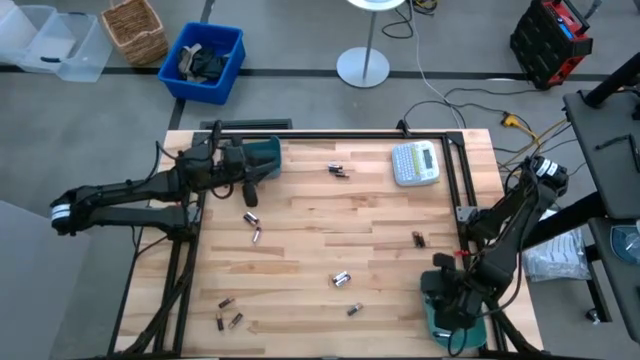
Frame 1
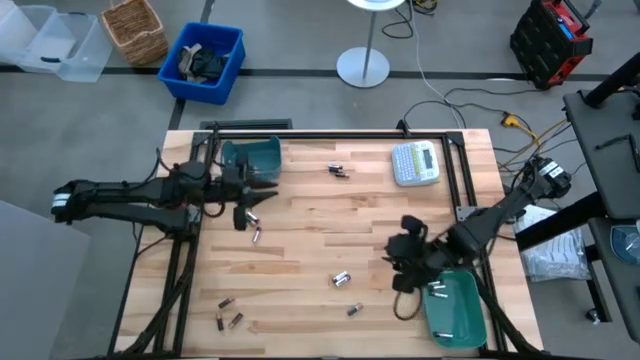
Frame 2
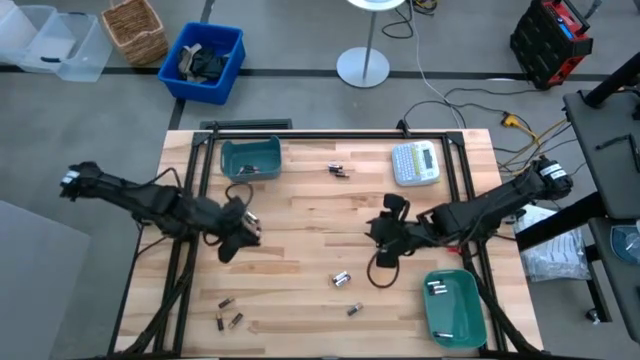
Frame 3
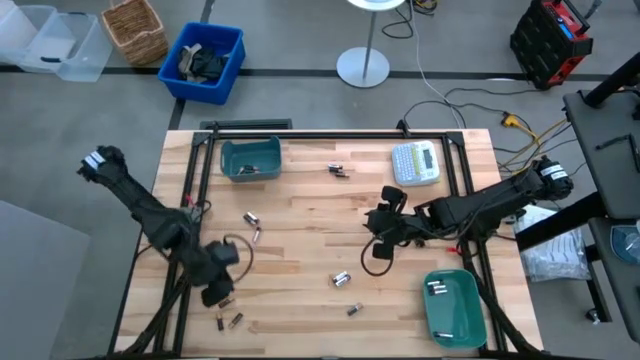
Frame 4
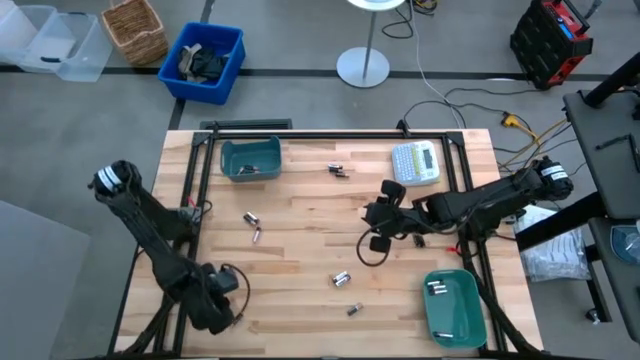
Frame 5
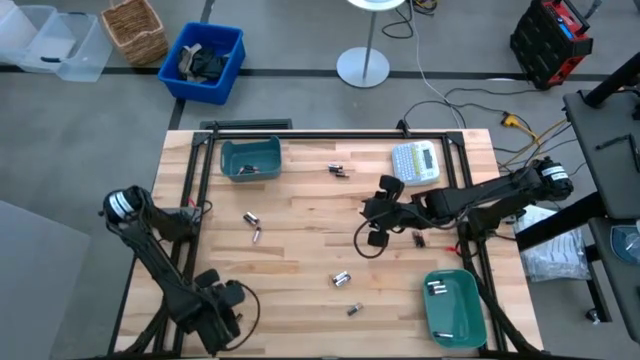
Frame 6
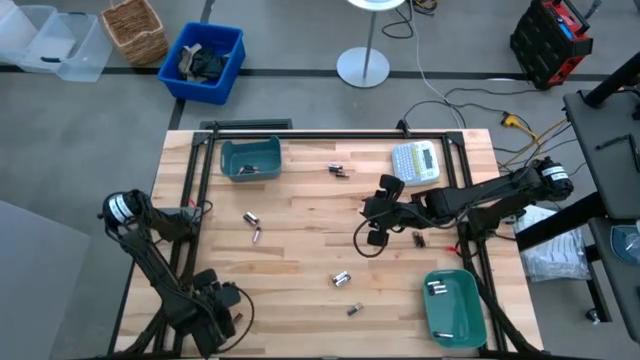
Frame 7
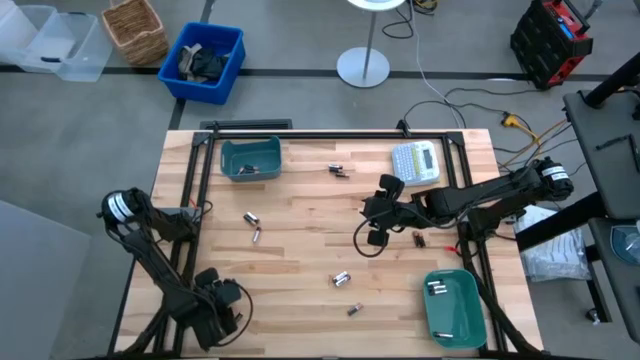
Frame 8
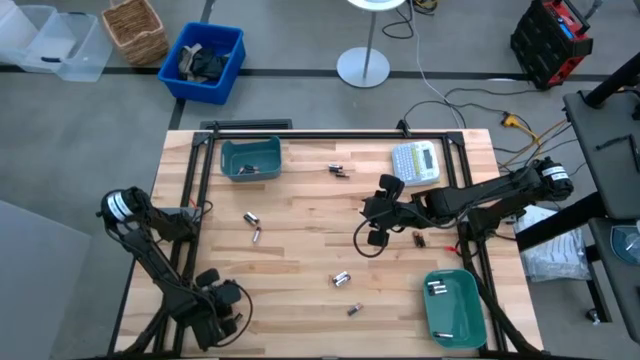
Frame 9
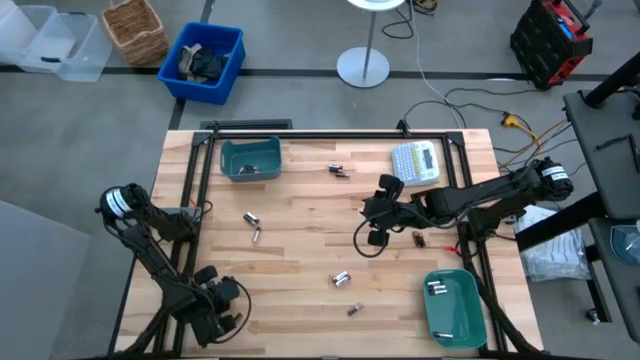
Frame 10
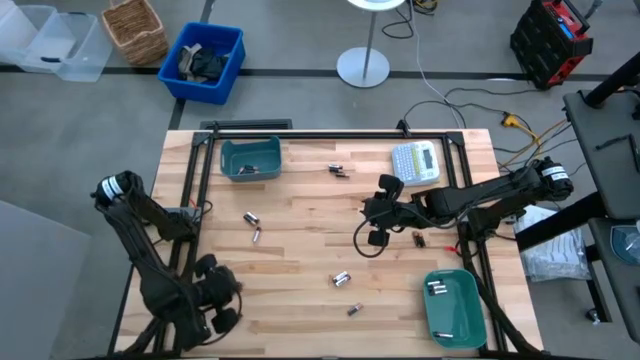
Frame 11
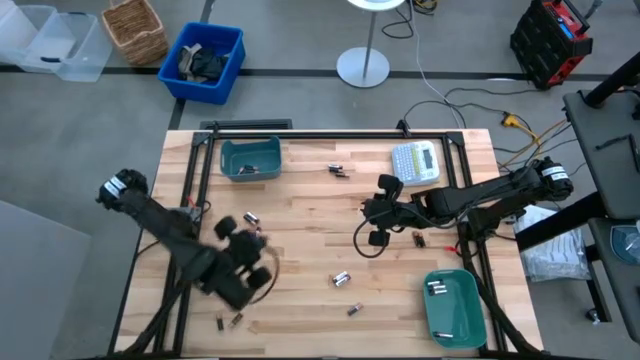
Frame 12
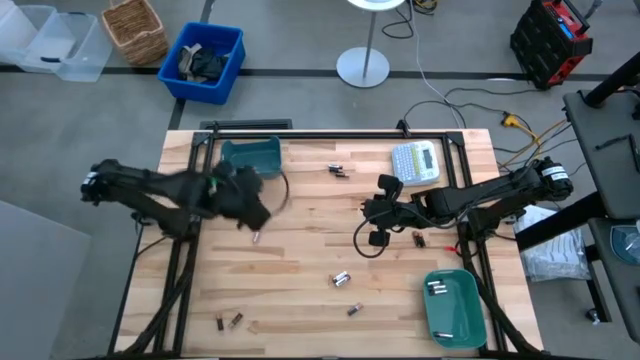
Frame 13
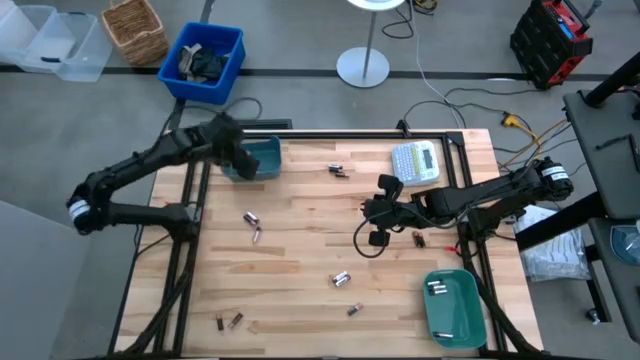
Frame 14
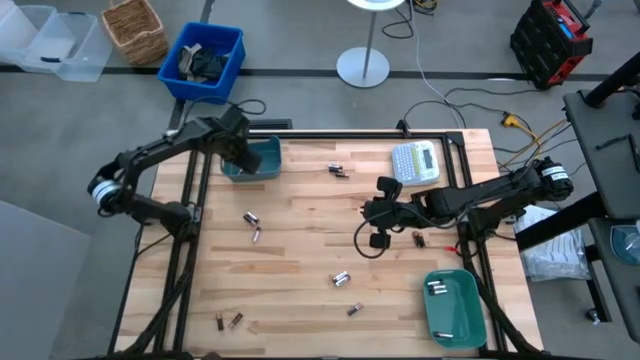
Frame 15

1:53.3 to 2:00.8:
Task: Sort batteries
Put the black battery into the blue bin

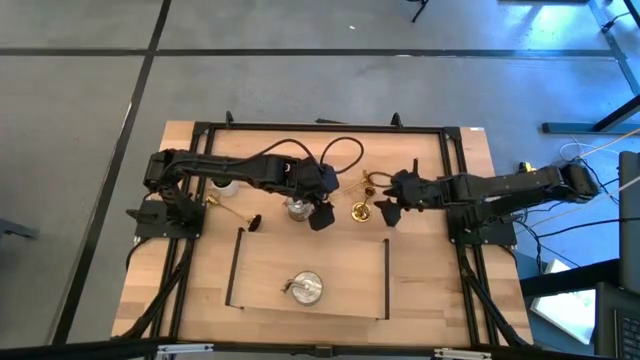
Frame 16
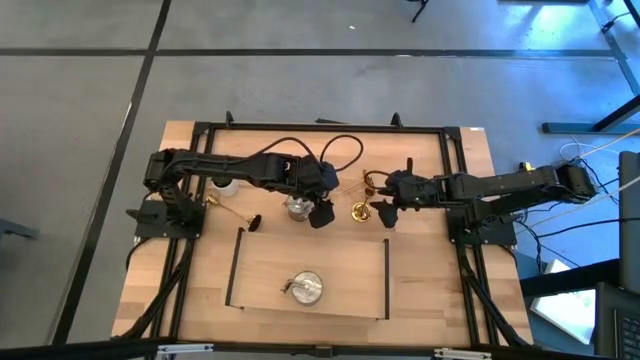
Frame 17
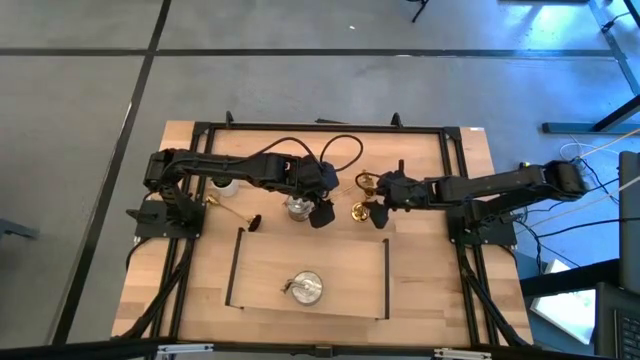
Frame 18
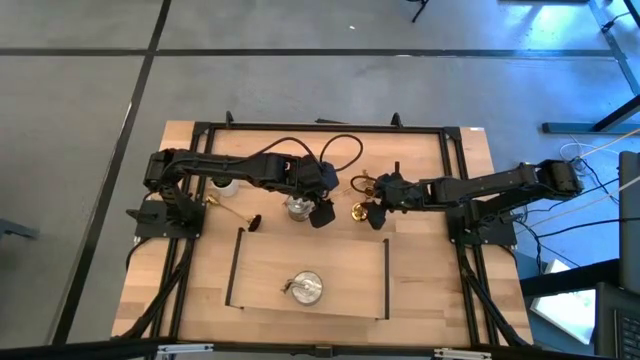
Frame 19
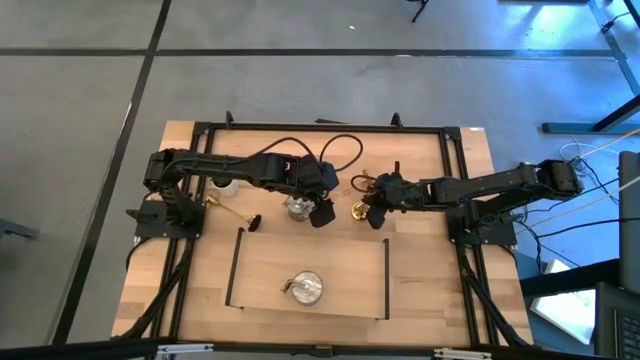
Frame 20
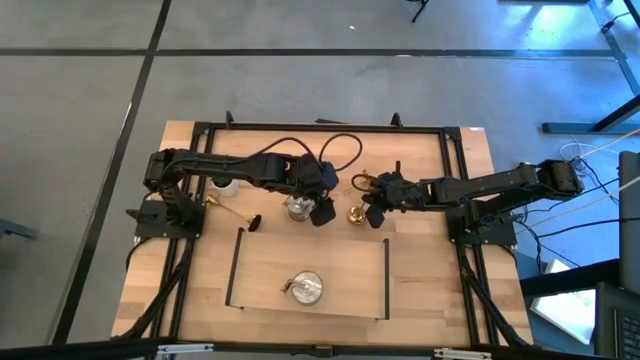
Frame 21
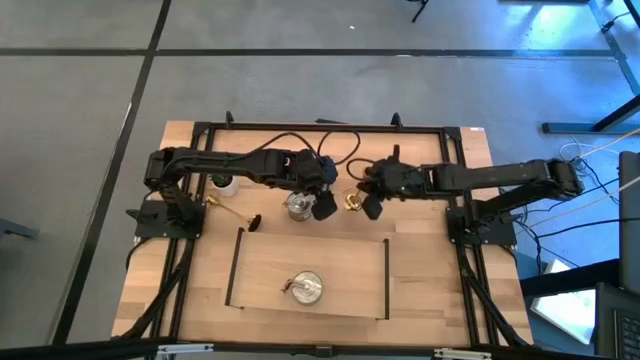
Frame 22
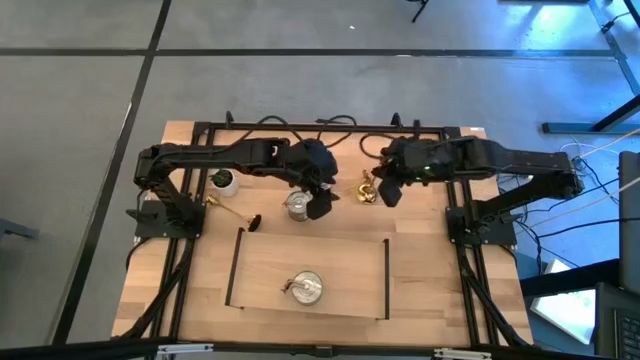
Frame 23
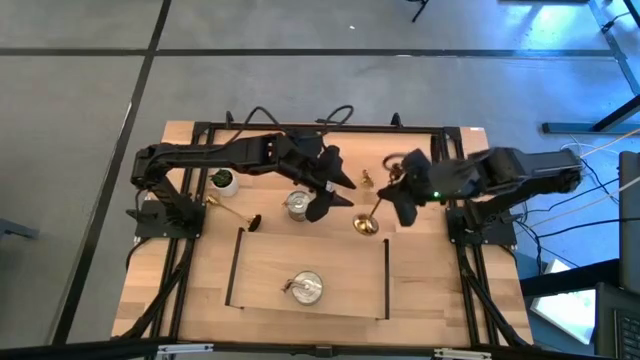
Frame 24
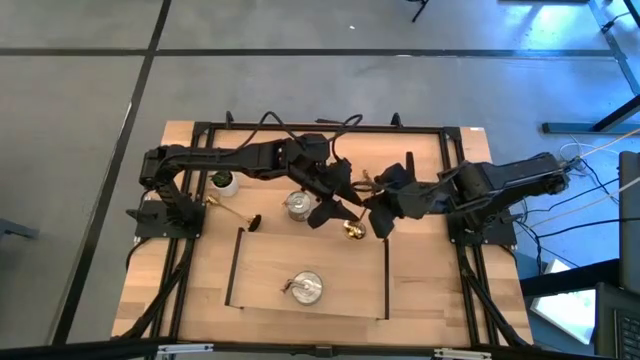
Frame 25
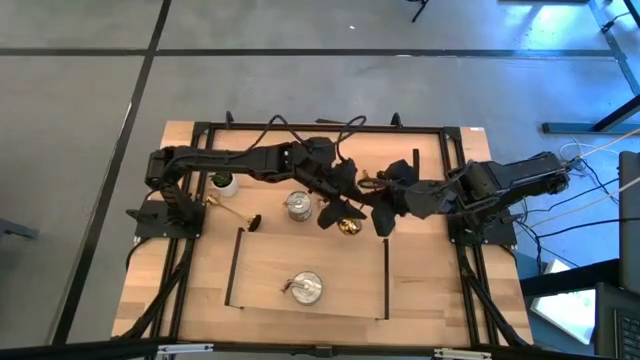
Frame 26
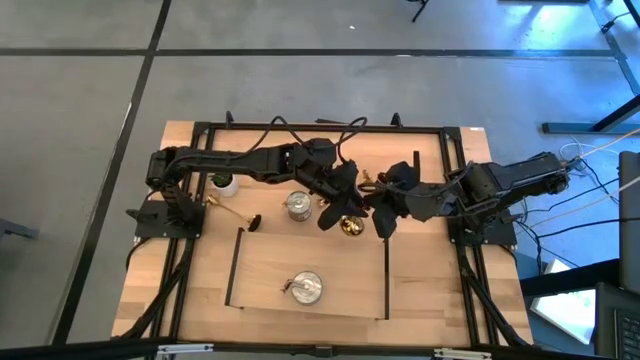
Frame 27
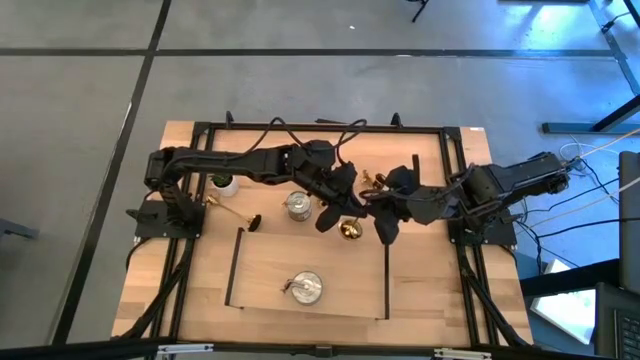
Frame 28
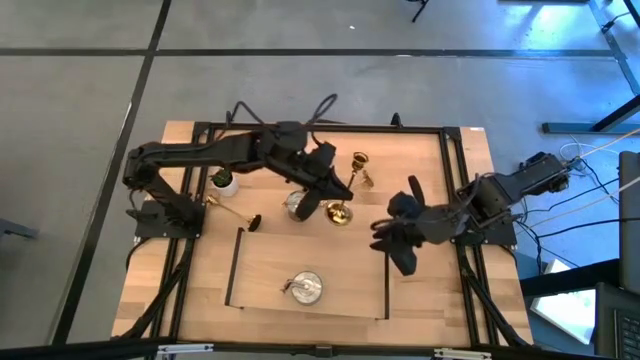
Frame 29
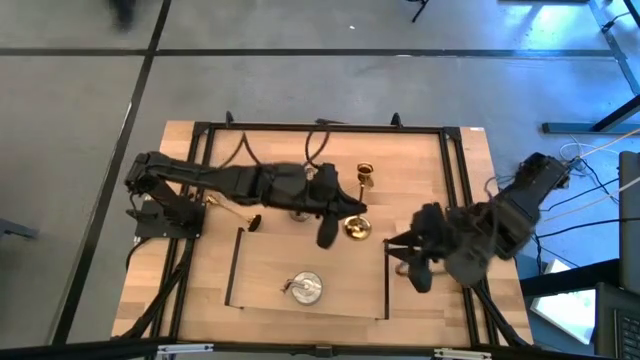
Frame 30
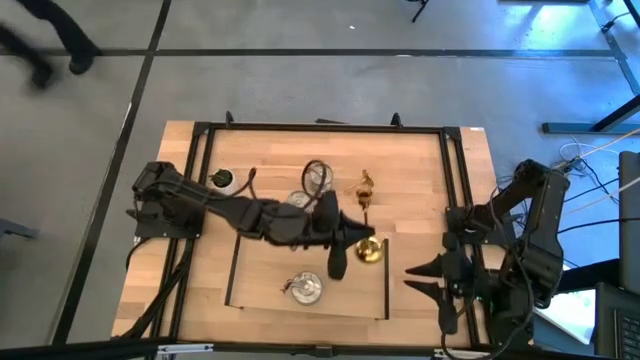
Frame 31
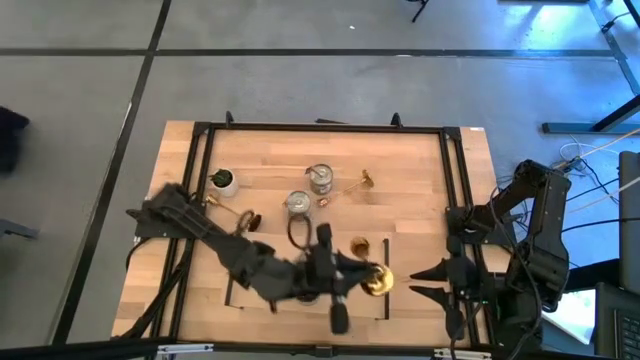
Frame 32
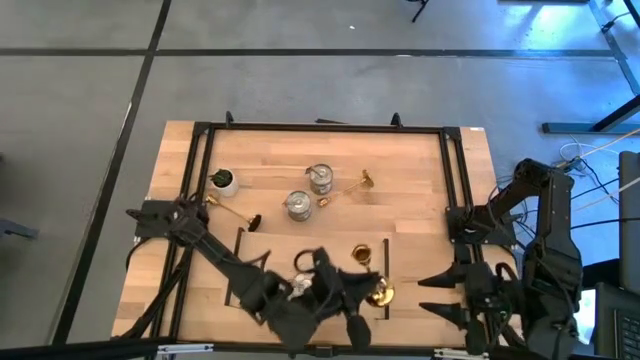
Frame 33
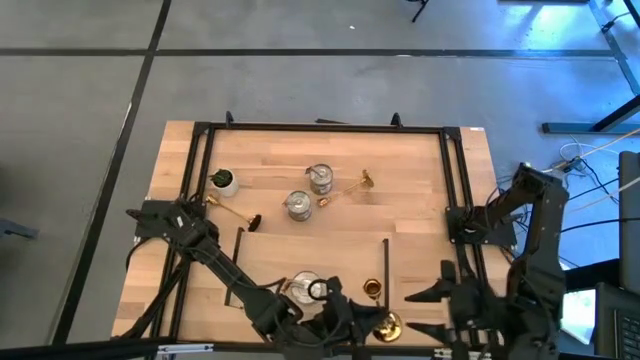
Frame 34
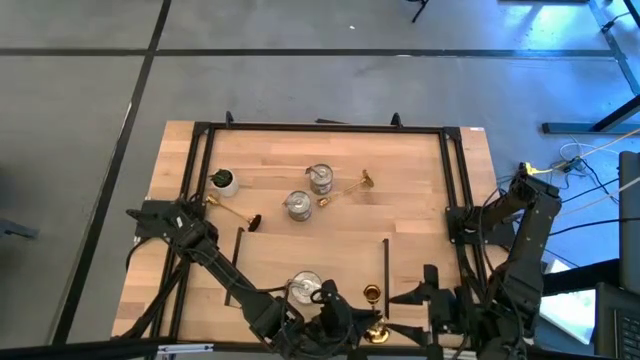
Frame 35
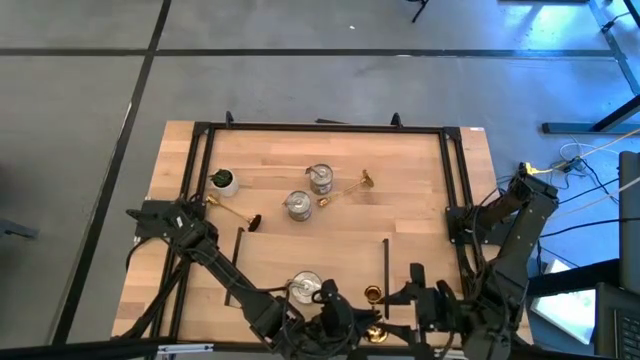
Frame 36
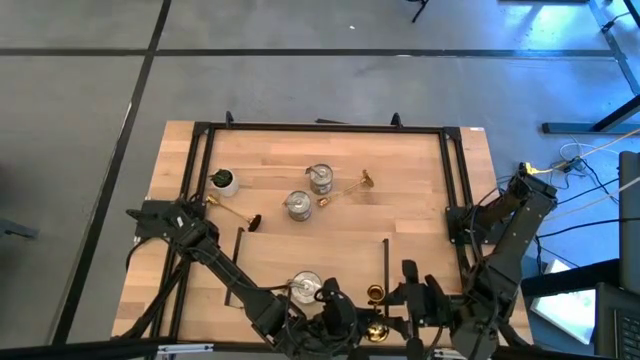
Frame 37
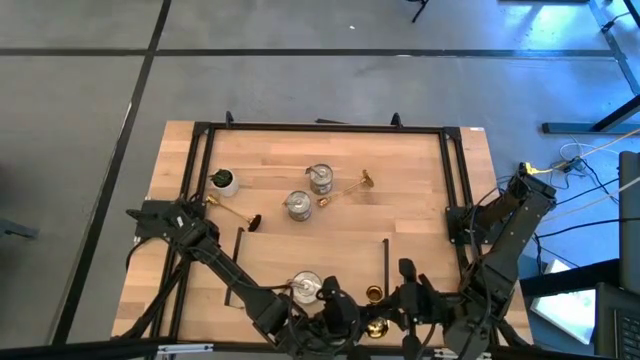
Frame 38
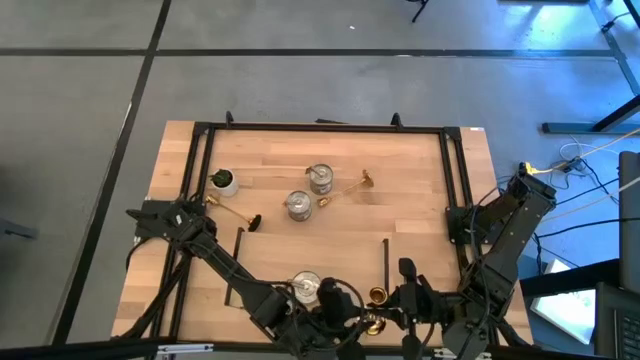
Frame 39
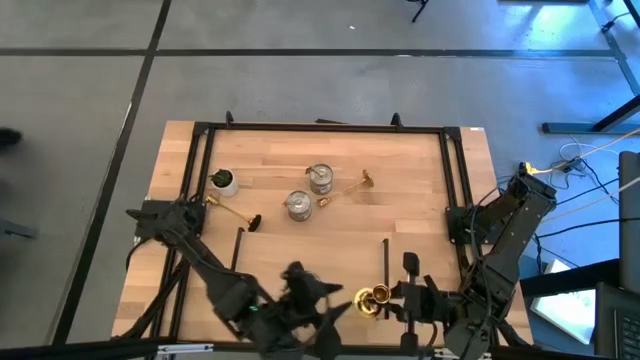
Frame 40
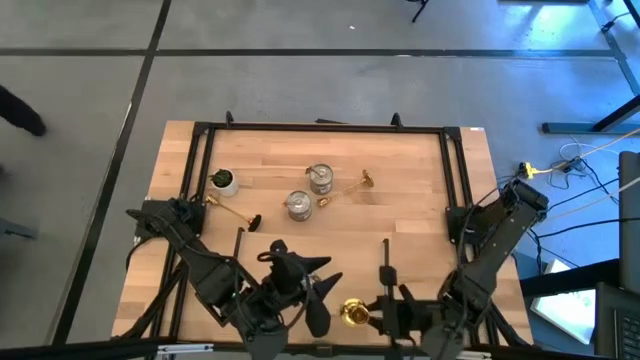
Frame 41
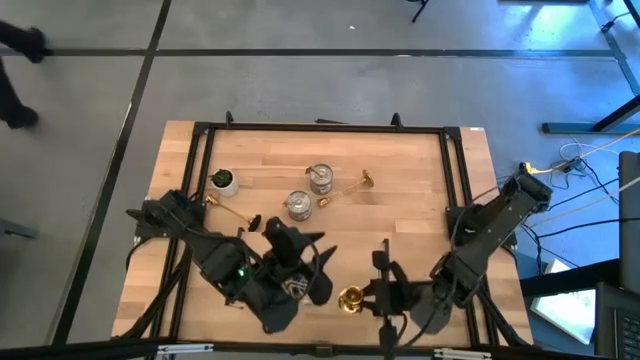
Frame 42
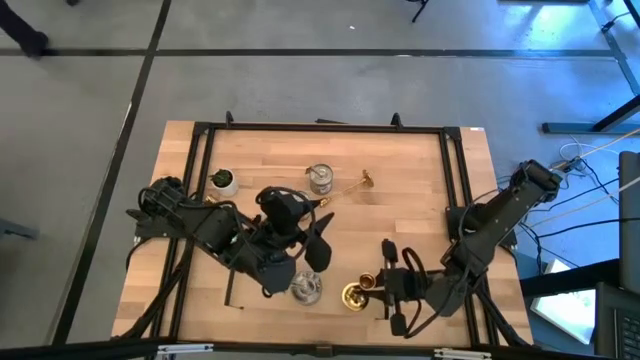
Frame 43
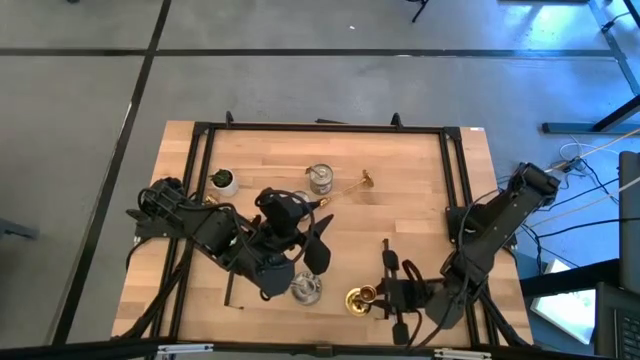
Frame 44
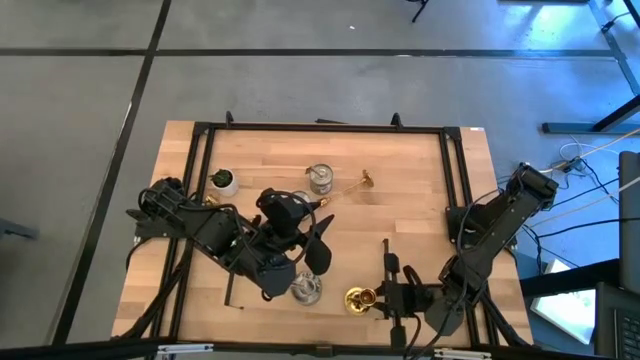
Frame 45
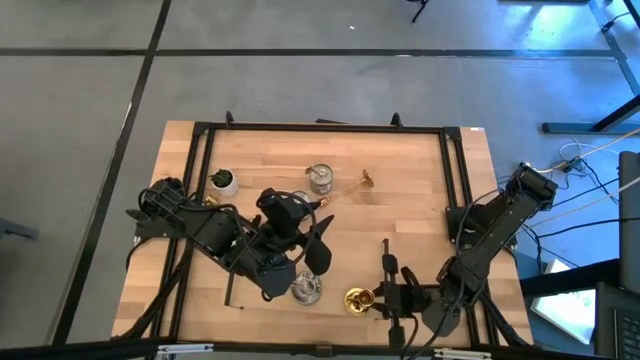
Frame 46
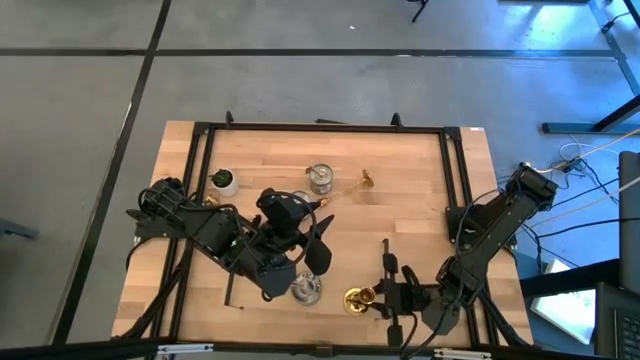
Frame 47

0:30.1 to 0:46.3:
Task: Pick & Place candle stick holders
Put the bottom right gold candle holder on the shelf
